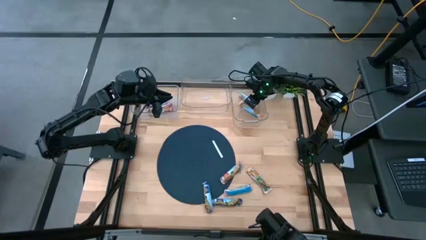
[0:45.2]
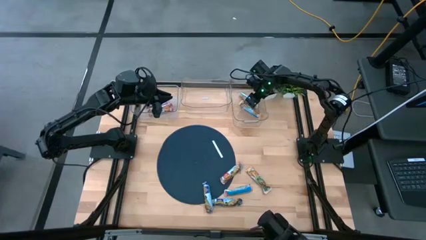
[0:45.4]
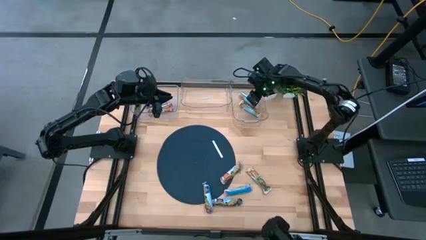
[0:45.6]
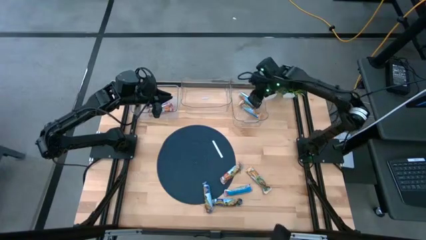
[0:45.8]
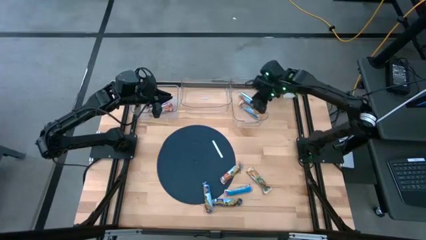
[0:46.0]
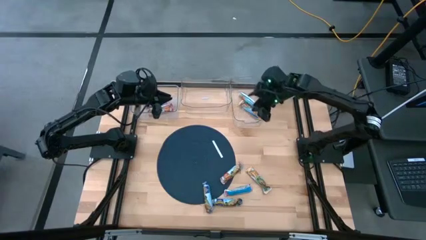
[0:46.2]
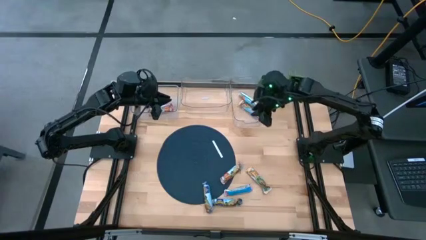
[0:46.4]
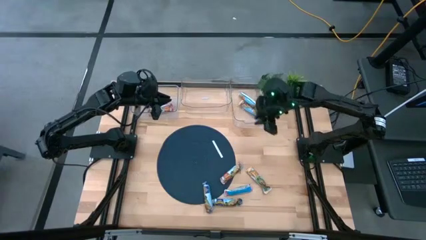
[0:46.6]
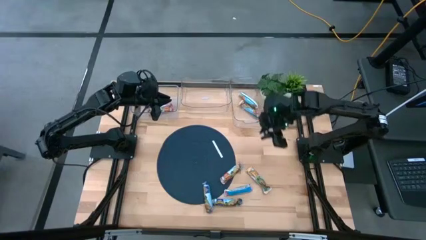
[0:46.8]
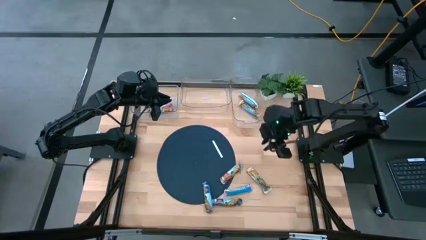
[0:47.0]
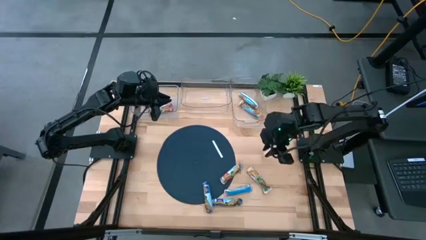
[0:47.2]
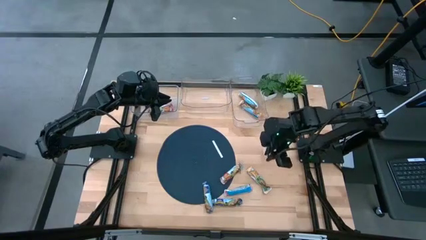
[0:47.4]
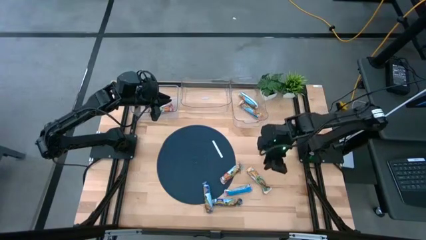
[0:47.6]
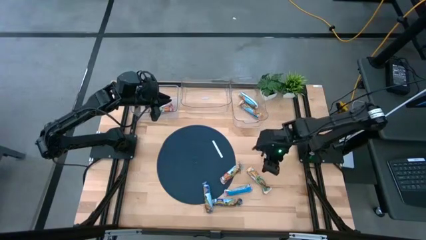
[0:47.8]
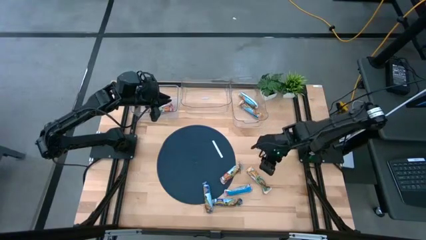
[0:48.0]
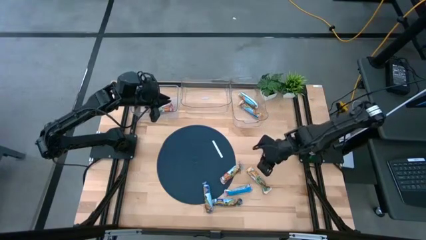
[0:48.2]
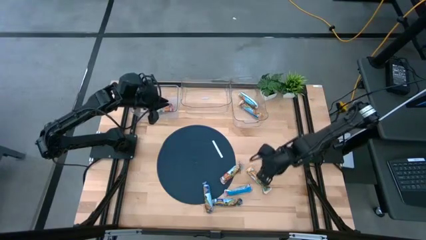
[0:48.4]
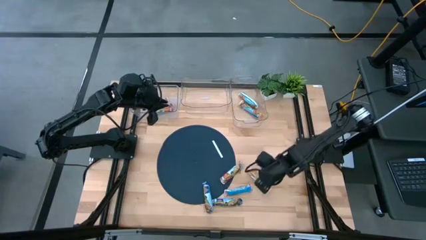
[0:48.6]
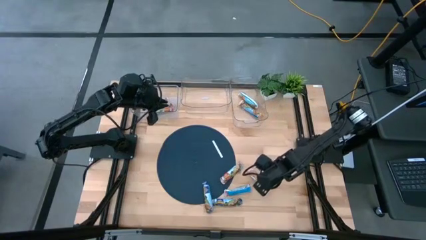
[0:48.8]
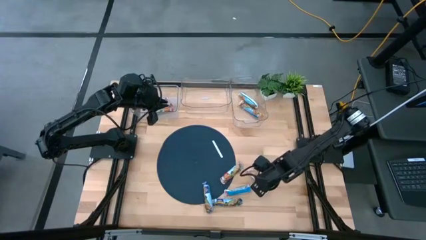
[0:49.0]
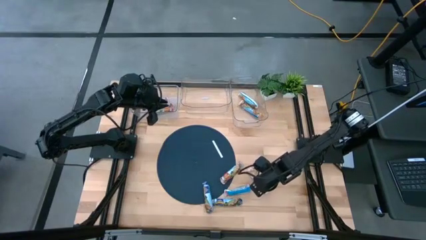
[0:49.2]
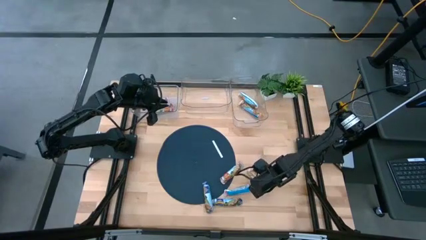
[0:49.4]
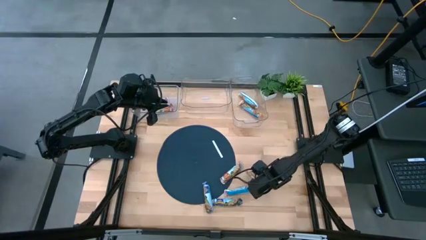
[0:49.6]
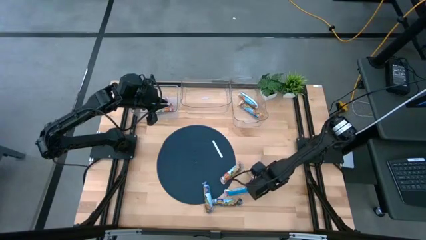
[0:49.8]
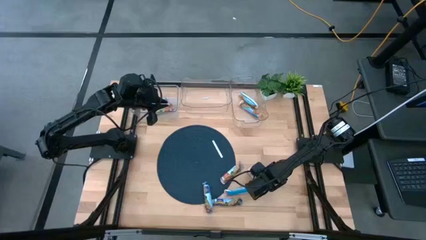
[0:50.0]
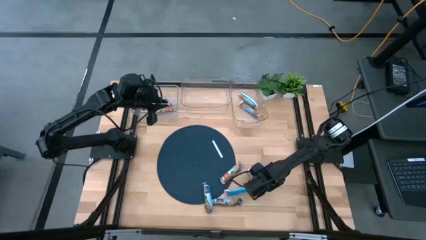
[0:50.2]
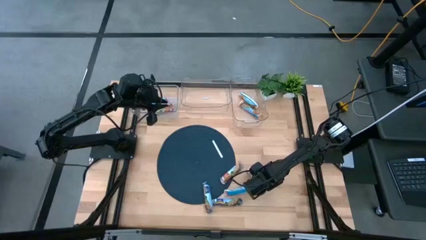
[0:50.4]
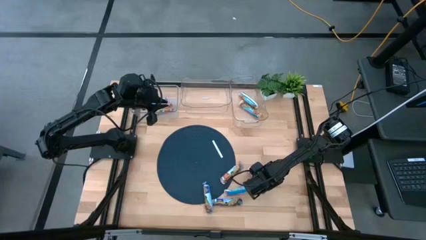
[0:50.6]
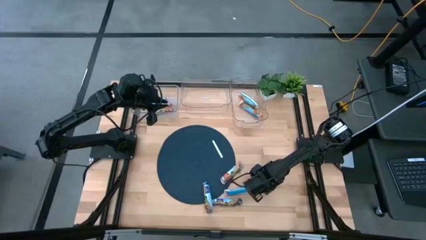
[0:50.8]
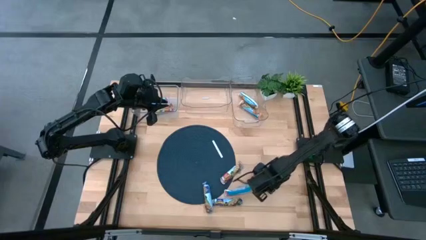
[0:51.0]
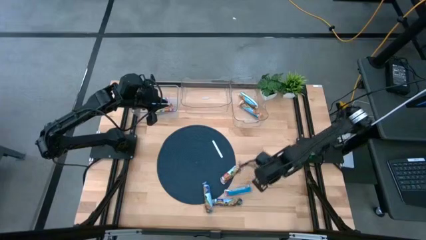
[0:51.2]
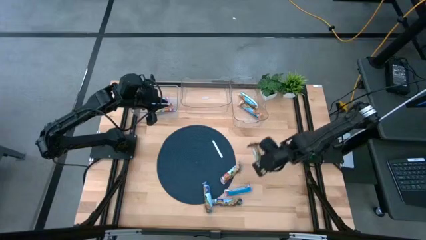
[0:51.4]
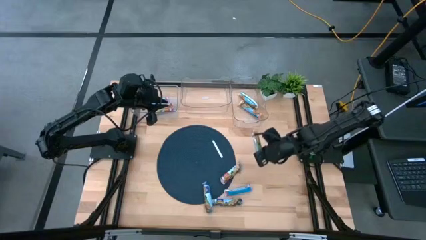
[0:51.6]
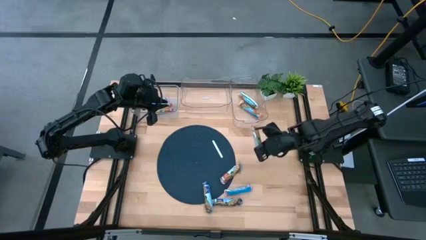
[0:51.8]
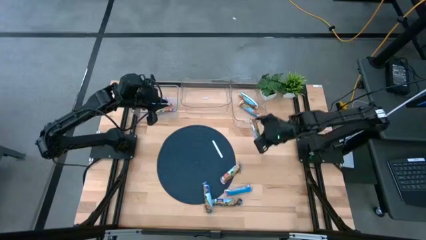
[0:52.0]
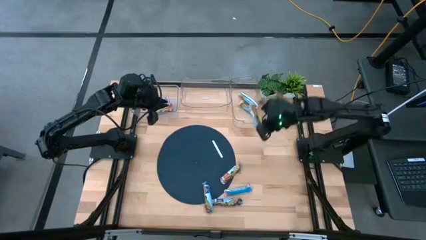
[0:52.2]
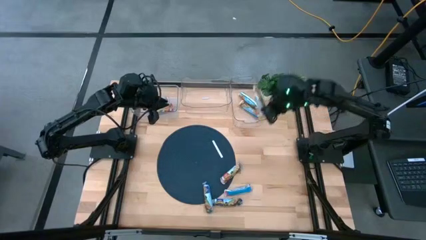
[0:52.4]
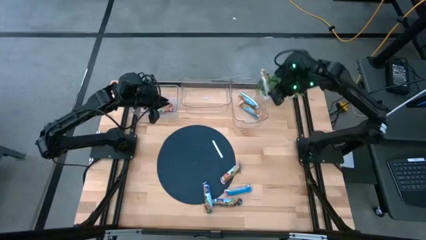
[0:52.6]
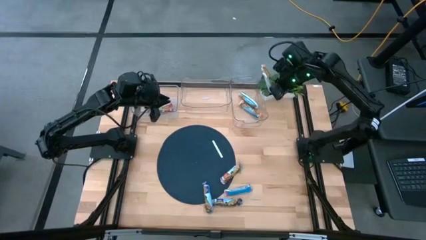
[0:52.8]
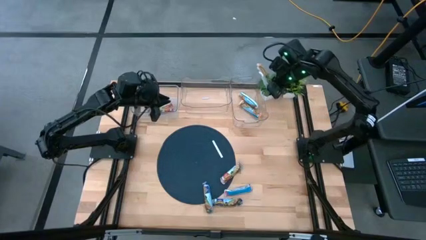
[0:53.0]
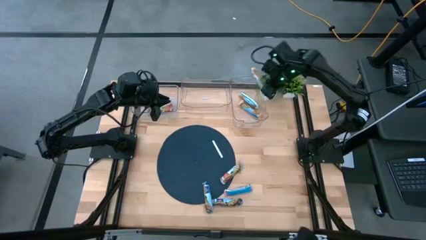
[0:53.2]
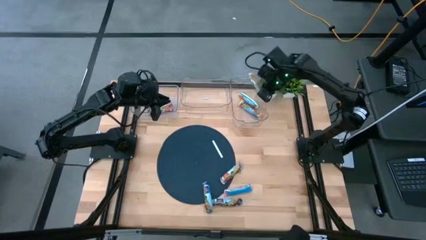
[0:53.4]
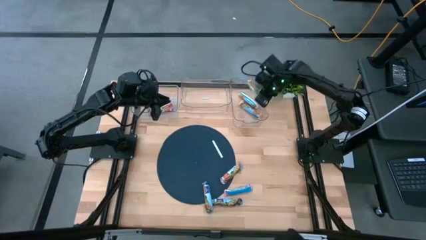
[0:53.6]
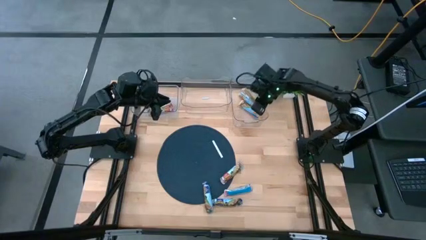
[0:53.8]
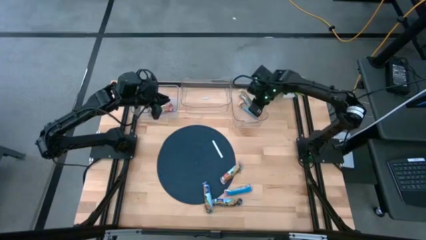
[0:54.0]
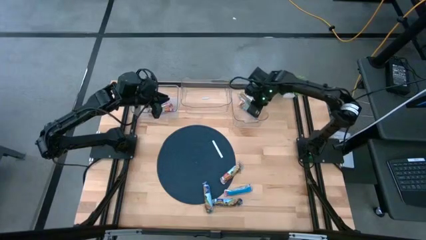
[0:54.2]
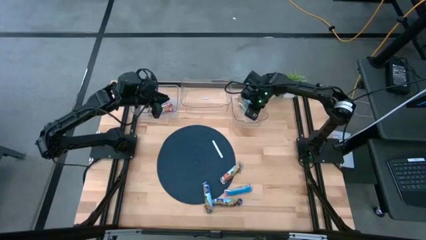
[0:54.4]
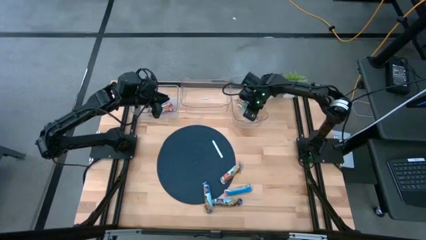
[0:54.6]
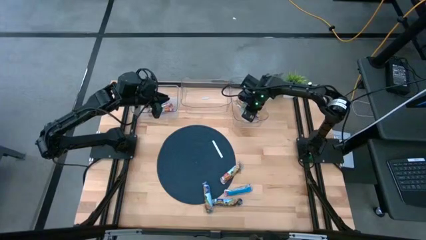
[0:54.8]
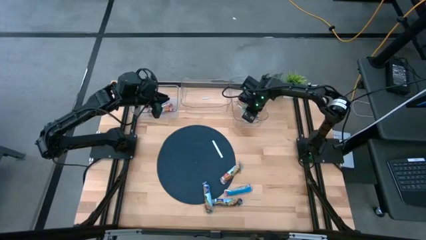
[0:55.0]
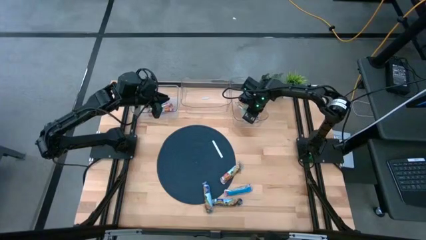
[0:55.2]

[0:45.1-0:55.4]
Task: Pick and place Granola Bars by type
Put the yellow chewy bar into the top right transparent bin
